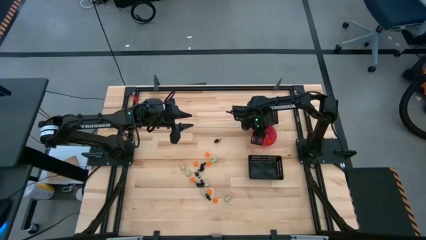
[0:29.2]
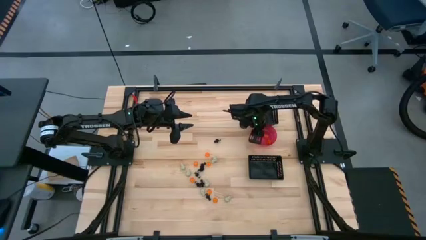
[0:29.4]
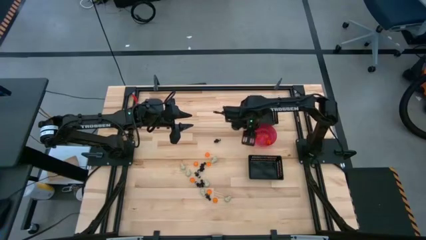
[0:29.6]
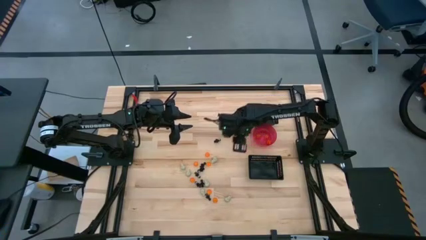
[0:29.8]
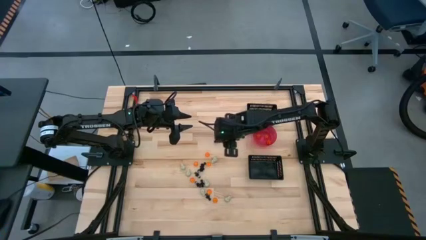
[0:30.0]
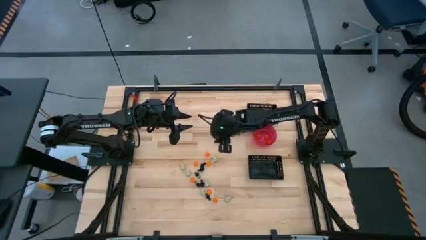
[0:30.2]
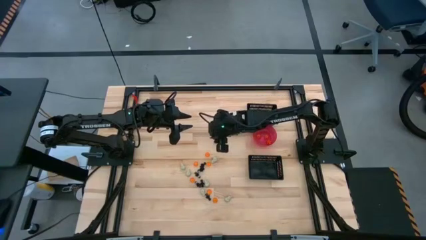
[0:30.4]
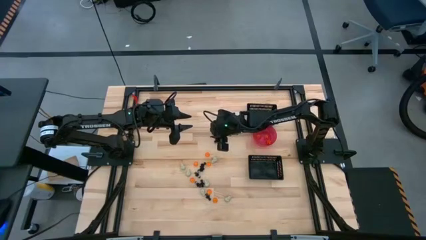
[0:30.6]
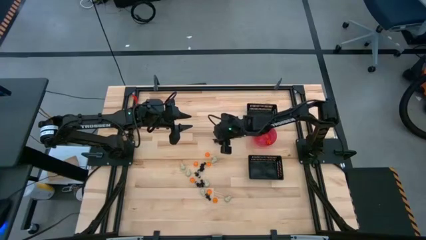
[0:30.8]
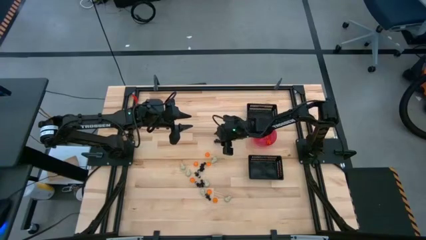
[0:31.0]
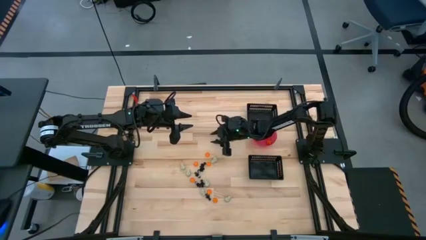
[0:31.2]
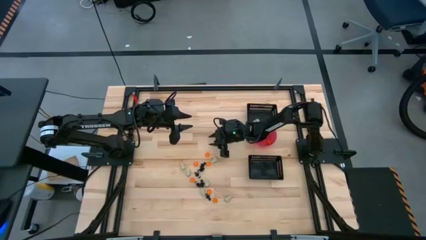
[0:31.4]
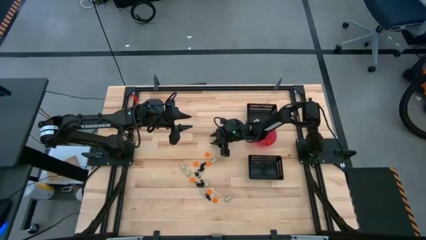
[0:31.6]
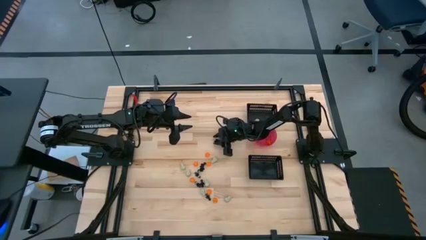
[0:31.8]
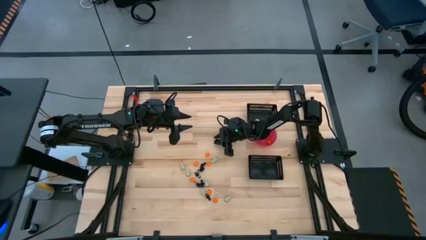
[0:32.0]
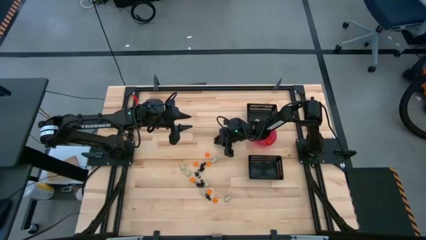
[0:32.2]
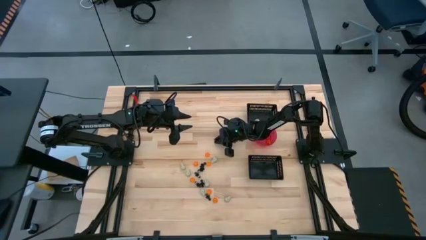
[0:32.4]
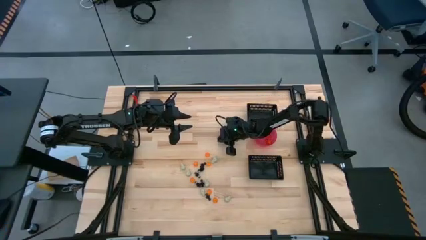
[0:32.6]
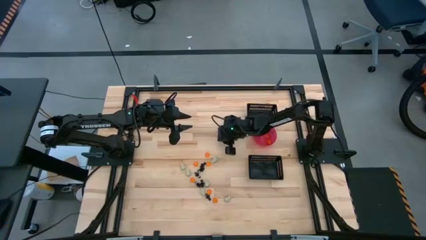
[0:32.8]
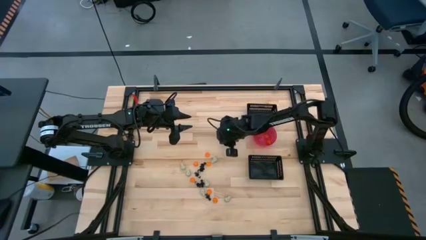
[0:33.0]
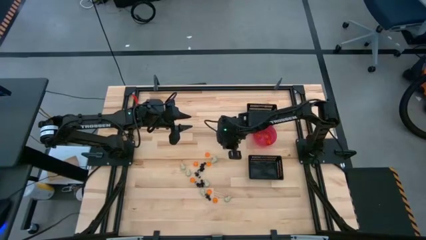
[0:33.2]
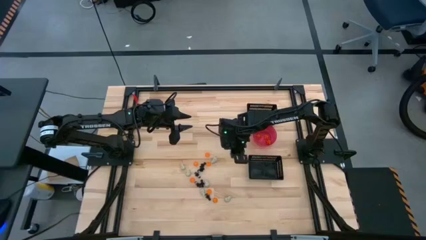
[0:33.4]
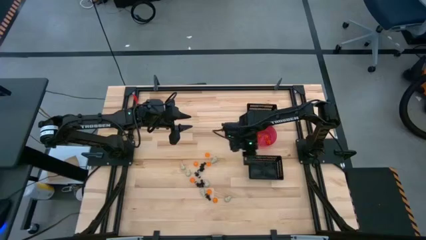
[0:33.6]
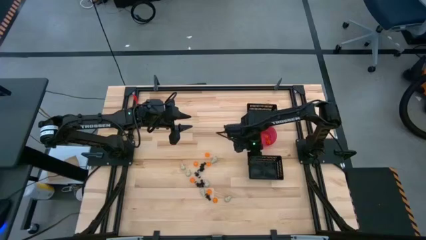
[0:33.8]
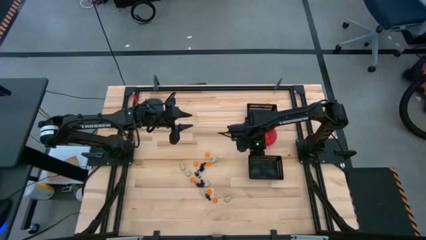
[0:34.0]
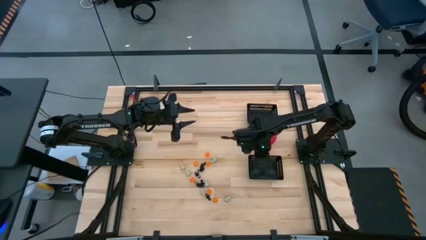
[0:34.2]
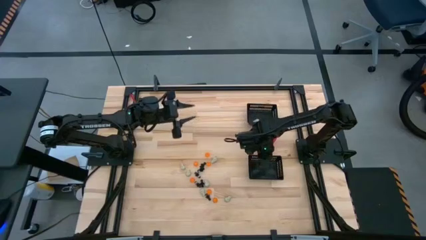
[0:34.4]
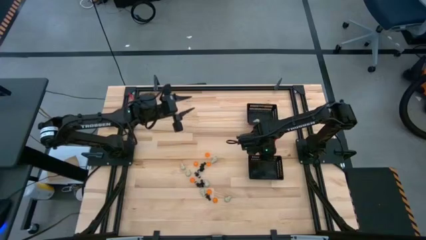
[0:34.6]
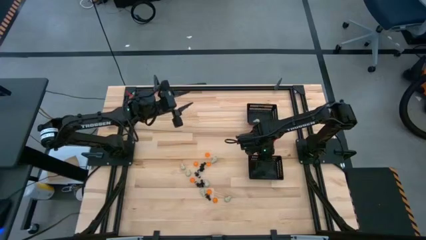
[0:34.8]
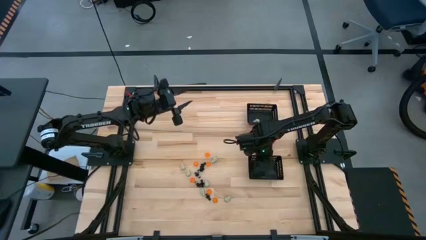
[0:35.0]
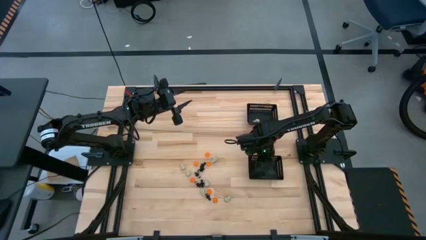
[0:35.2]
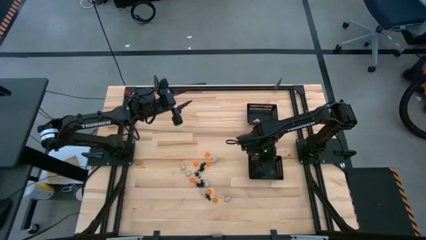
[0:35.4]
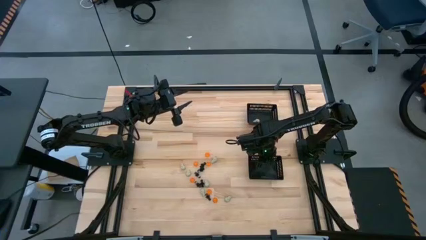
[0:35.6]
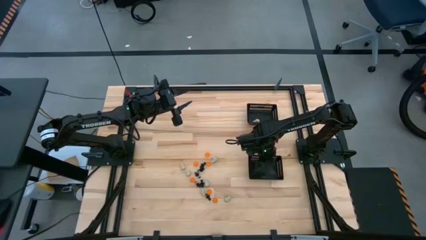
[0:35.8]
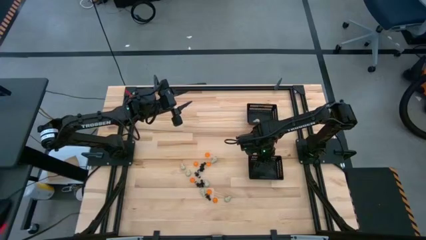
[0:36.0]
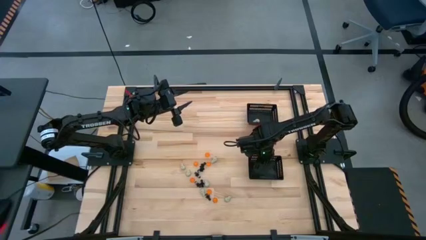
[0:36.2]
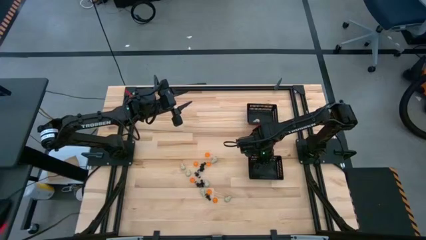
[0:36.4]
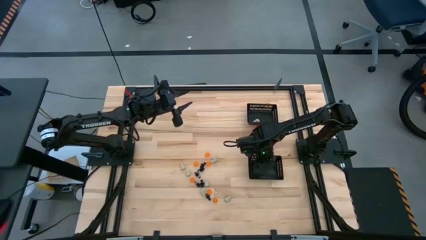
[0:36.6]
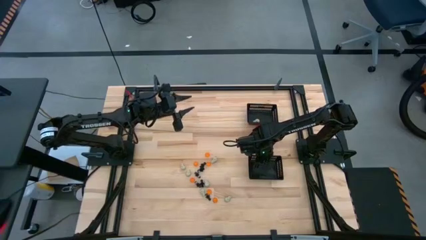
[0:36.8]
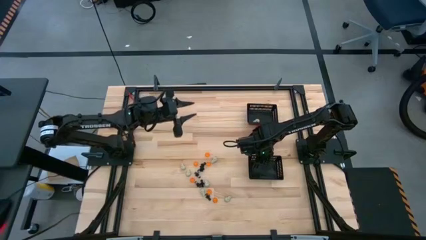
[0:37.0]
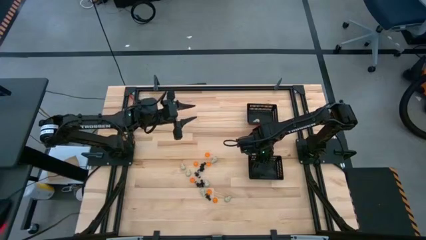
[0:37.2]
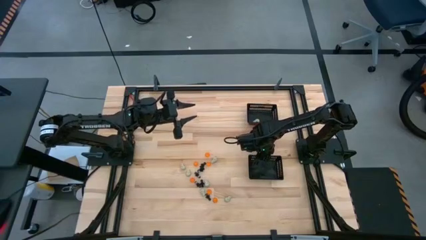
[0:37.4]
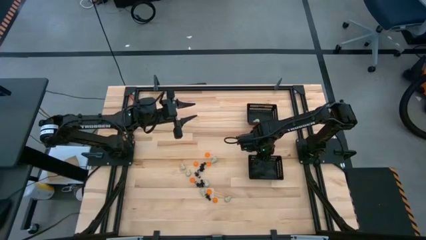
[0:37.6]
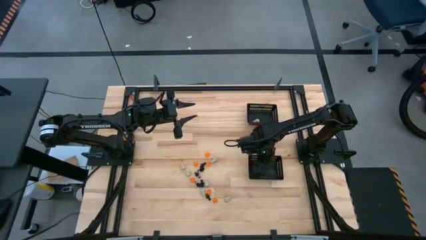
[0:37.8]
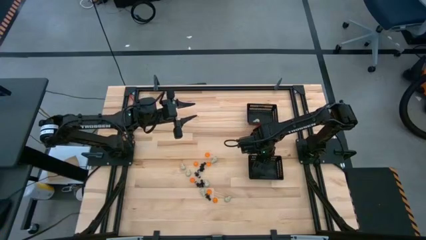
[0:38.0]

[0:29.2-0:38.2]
Task: Sort Halloween decoration
Put the black skeleton toy into the bottom black bin

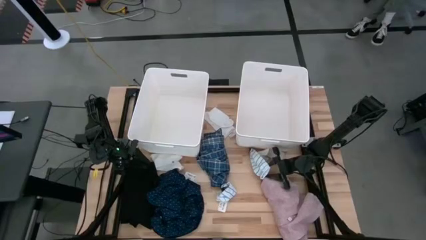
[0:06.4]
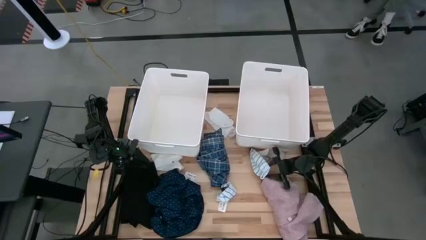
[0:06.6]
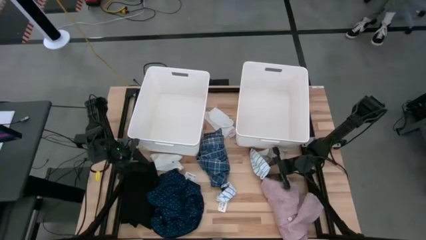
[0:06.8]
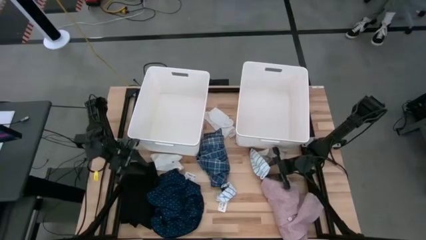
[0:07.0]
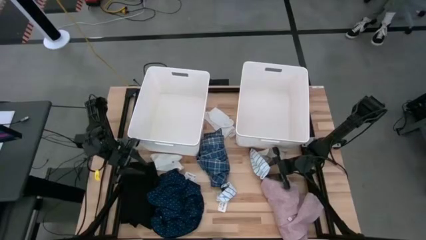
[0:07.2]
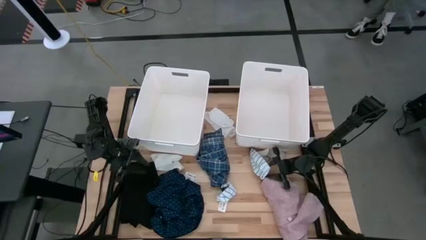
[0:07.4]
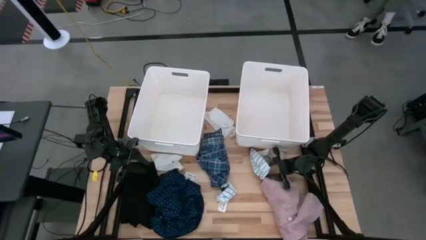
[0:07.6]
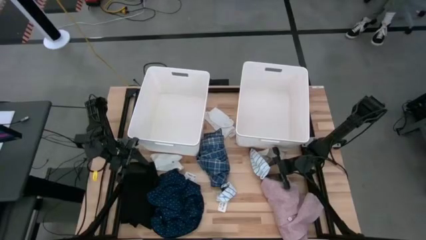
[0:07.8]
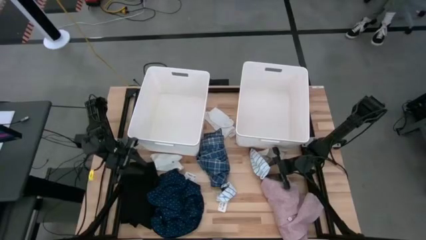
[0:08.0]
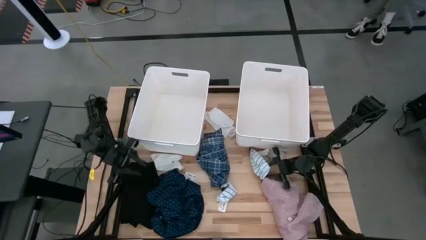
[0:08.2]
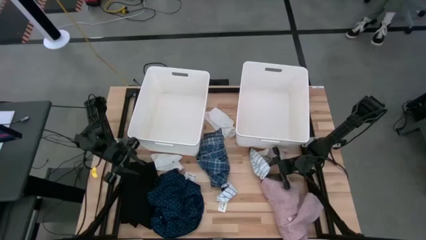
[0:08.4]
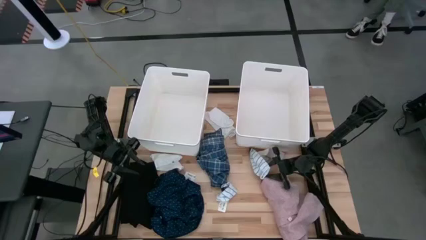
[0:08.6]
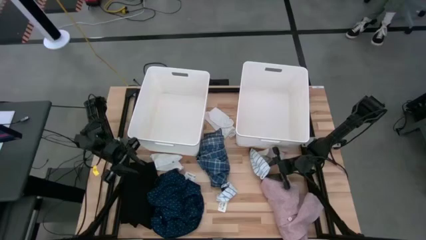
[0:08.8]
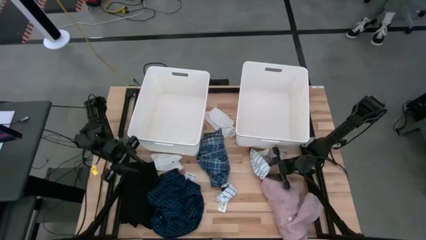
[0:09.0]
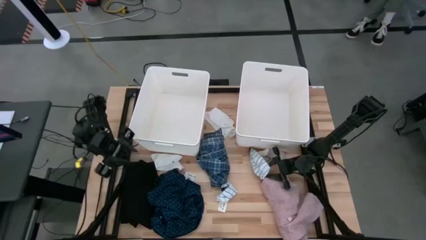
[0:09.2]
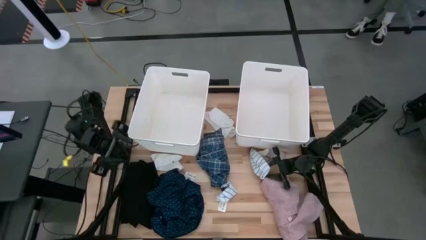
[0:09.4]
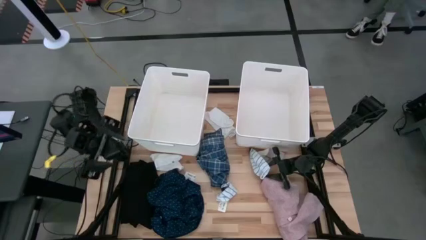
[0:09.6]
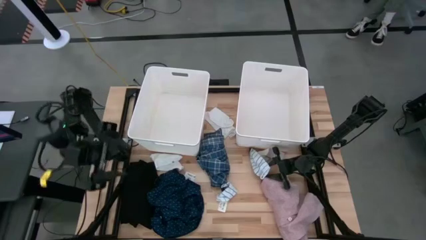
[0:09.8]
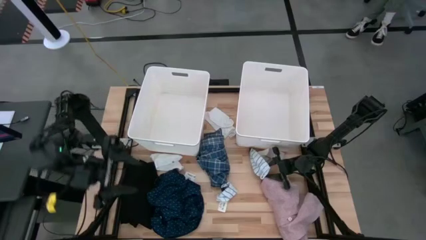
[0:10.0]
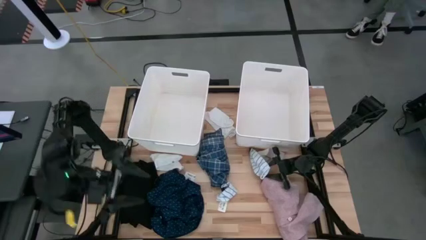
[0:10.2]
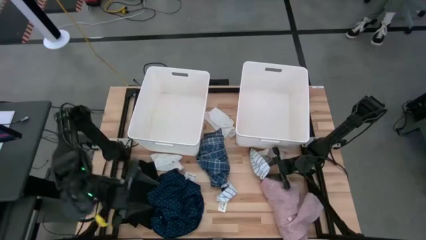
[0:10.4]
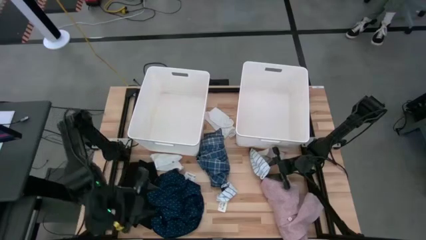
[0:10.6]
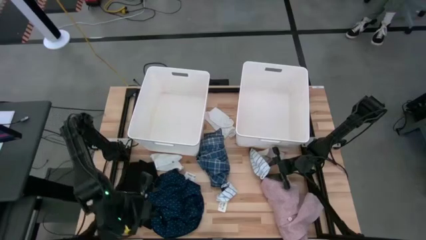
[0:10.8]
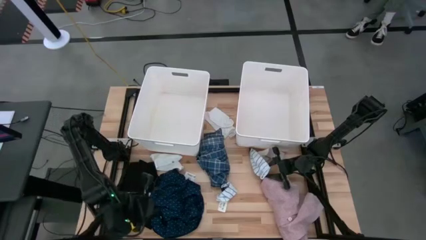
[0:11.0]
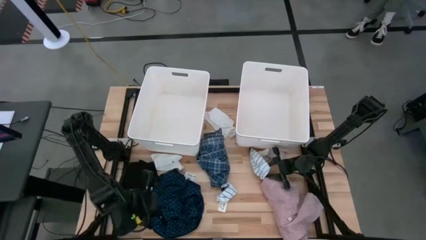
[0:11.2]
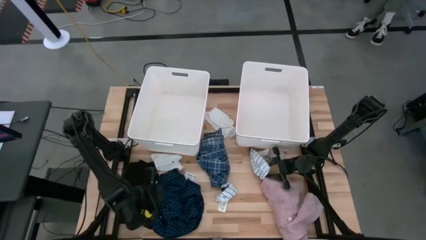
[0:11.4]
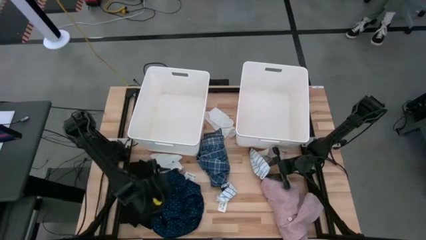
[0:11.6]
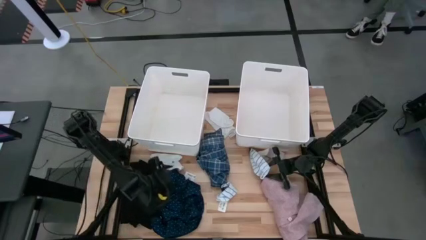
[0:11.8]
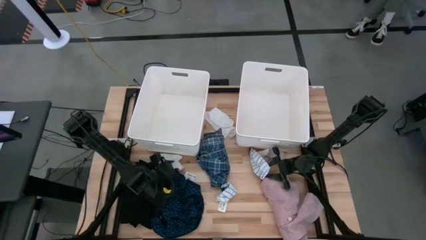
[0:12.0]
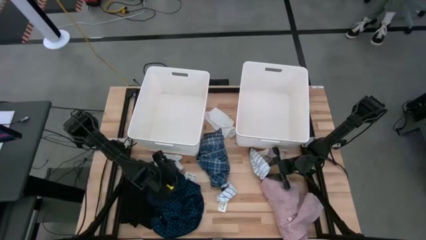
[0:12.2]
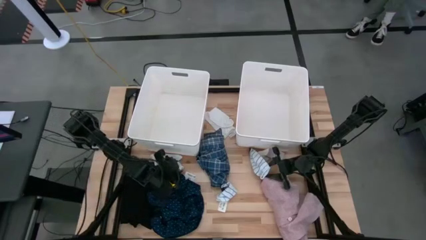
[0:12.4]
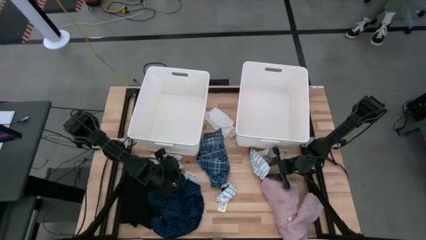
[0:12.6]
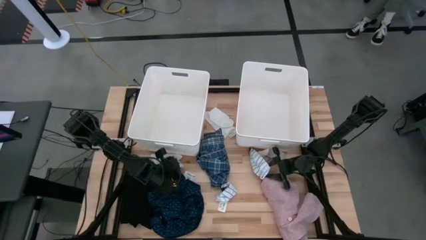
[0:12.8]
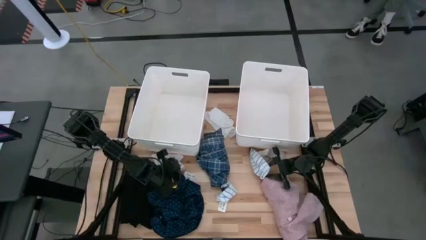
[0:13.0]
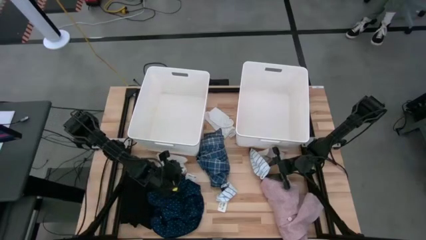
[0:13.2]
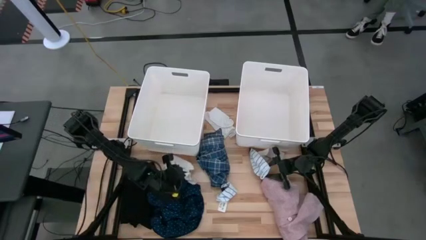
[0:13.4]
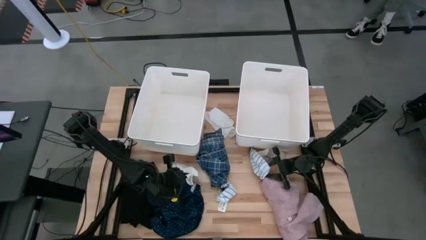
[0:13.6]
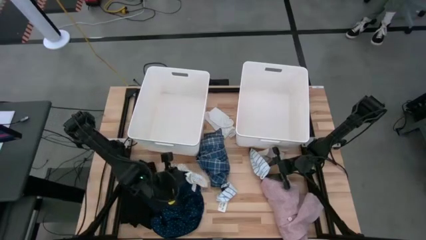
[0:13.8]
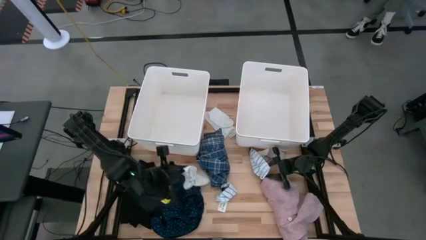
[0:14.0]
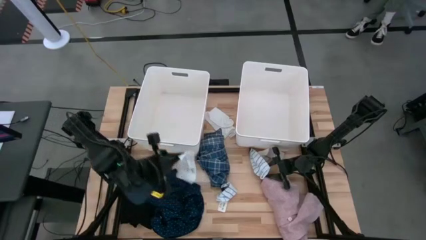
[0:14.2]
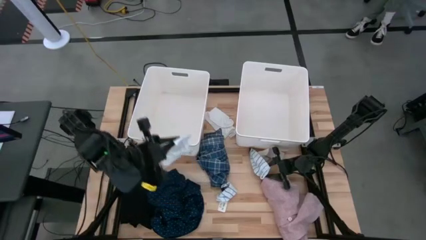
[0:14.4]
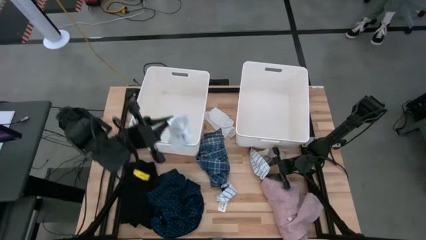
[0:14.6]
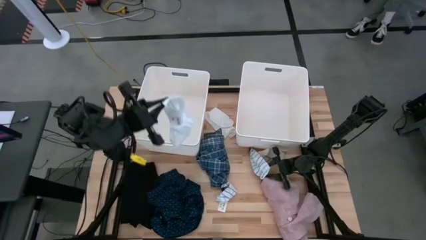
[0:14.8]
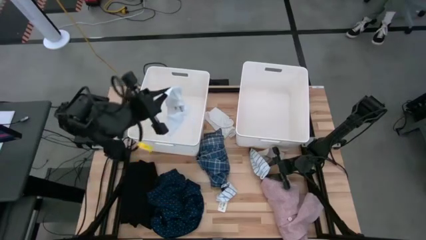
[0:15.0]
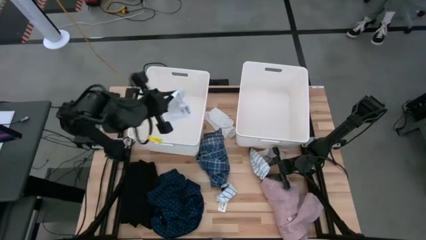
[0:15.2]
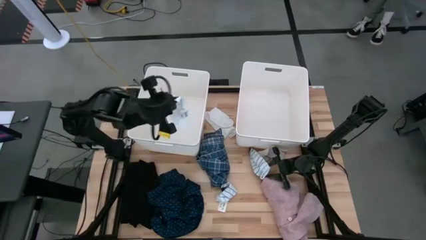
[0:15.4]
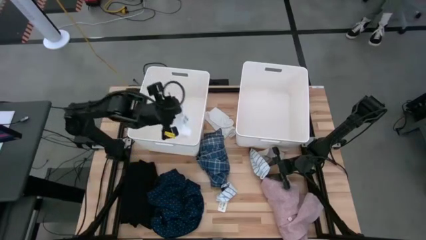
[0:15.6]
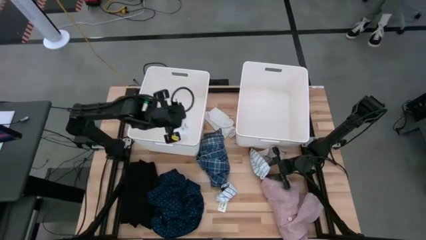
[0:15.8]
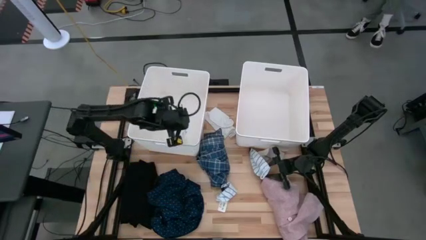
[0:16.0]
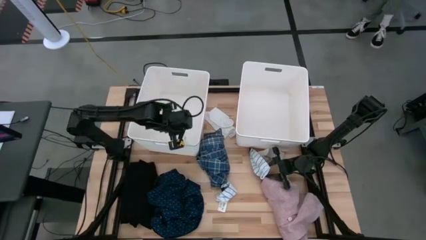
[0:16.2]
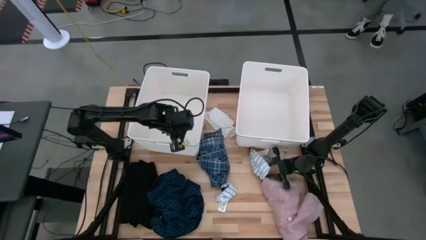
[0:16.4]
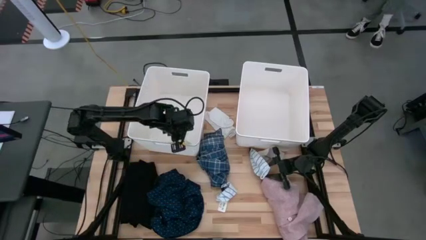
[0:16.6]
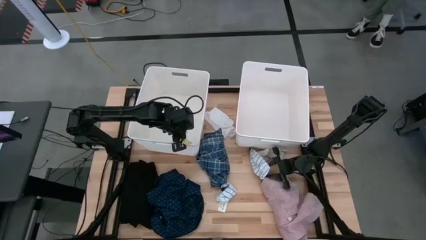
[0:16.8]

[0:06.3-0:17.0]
Task: Sort clothes
Put the left white sock into the left white laundry bin
